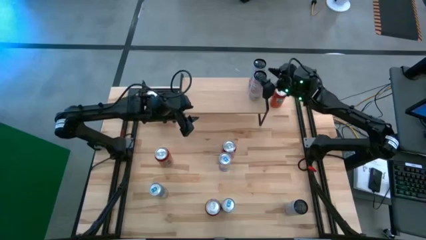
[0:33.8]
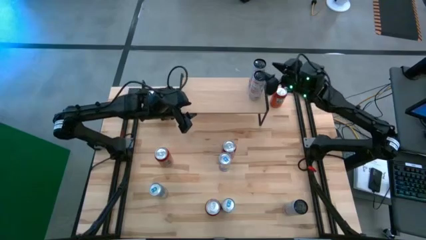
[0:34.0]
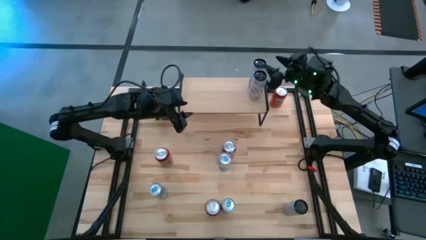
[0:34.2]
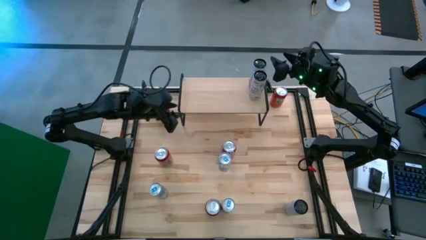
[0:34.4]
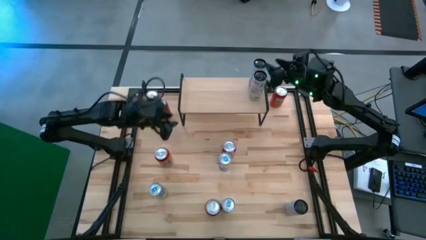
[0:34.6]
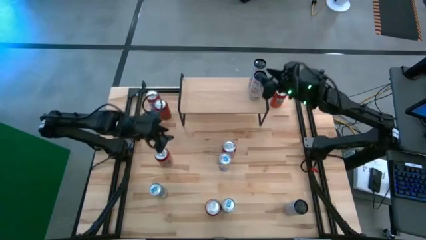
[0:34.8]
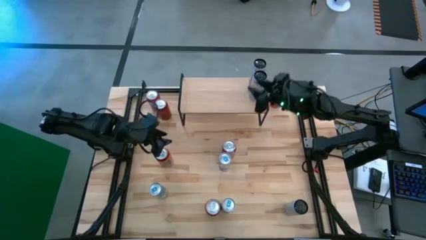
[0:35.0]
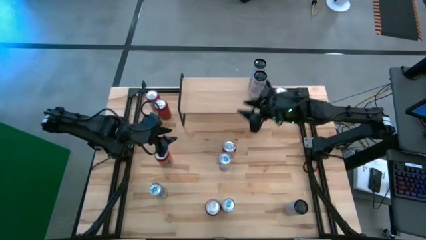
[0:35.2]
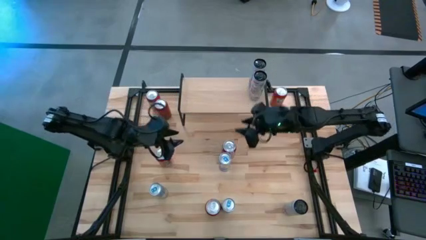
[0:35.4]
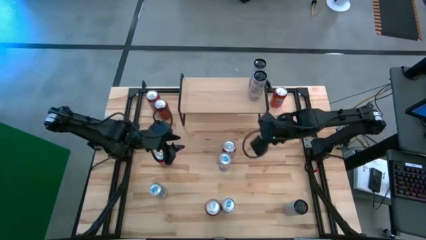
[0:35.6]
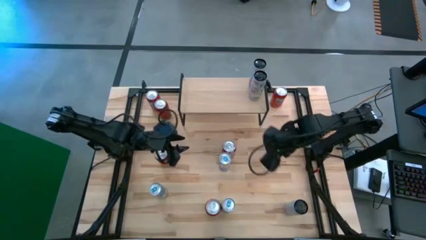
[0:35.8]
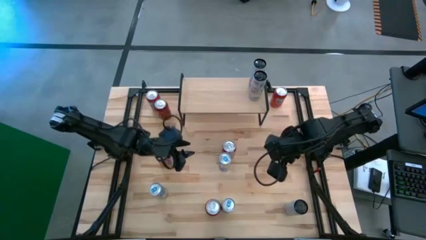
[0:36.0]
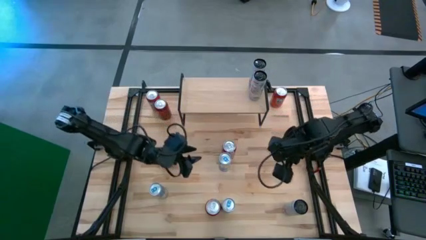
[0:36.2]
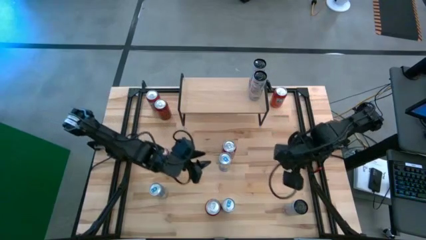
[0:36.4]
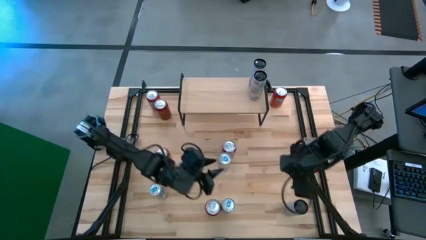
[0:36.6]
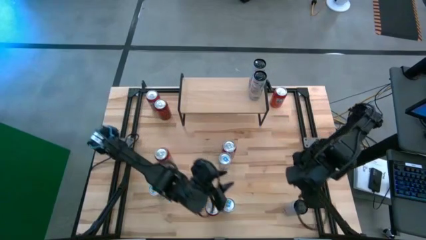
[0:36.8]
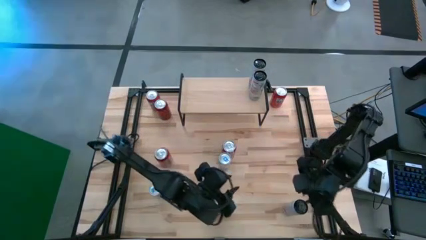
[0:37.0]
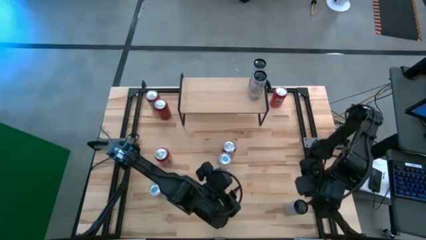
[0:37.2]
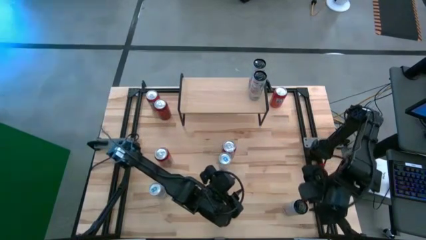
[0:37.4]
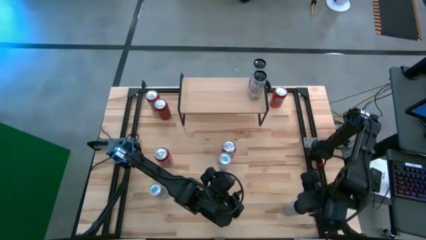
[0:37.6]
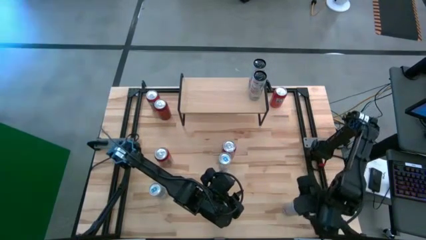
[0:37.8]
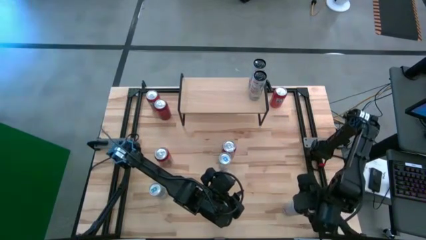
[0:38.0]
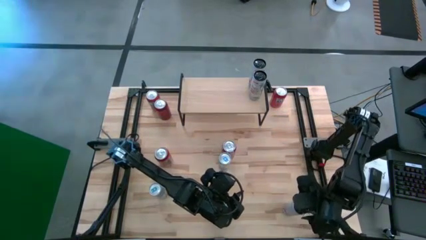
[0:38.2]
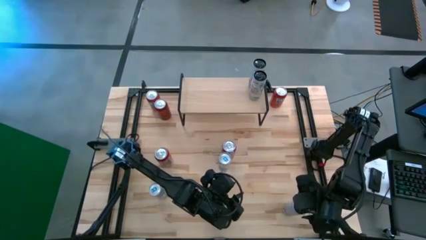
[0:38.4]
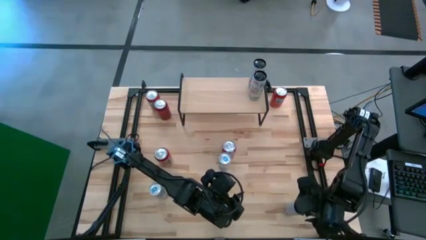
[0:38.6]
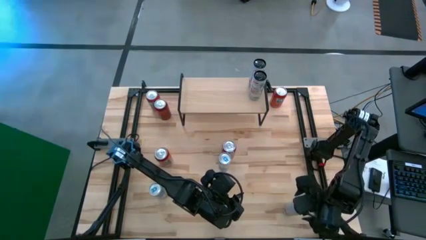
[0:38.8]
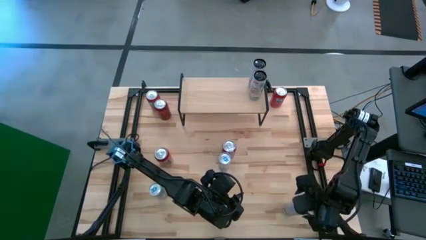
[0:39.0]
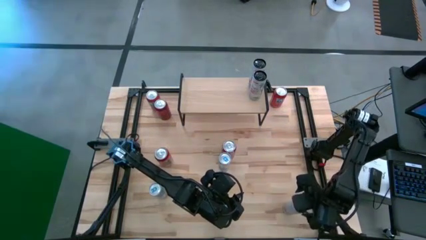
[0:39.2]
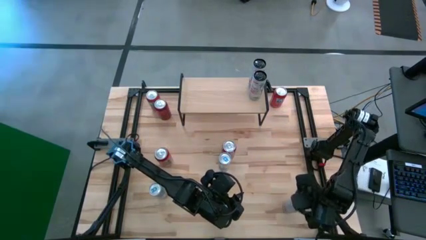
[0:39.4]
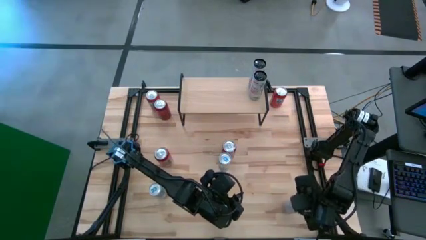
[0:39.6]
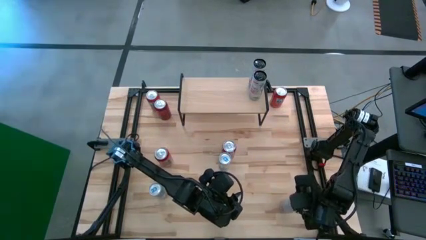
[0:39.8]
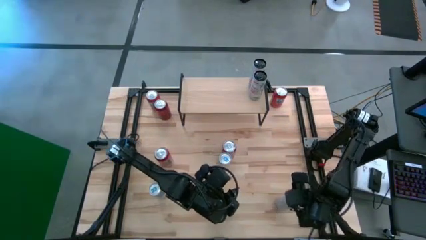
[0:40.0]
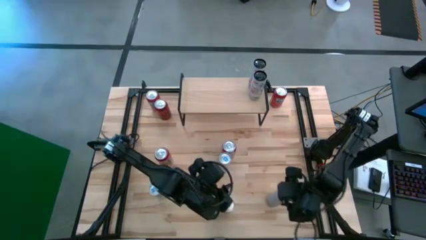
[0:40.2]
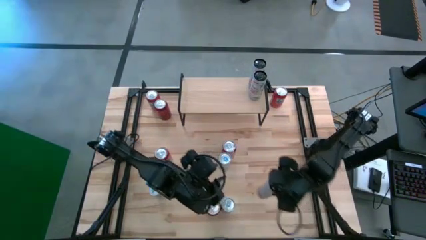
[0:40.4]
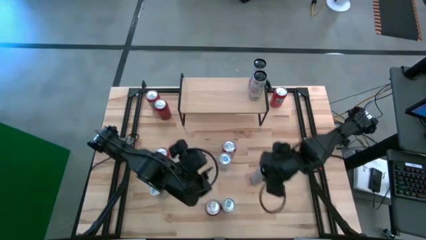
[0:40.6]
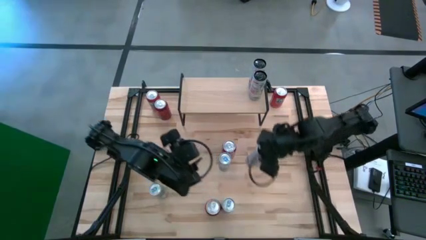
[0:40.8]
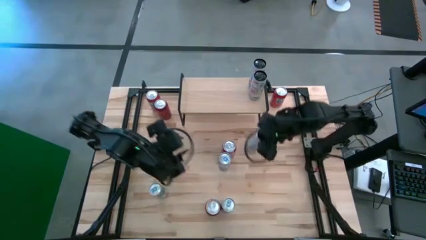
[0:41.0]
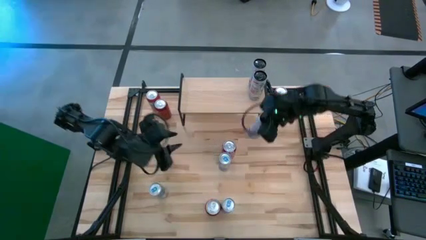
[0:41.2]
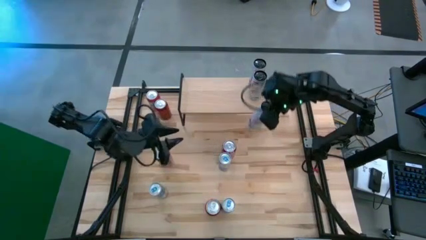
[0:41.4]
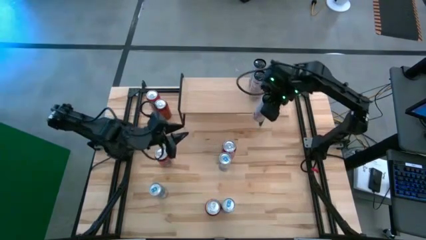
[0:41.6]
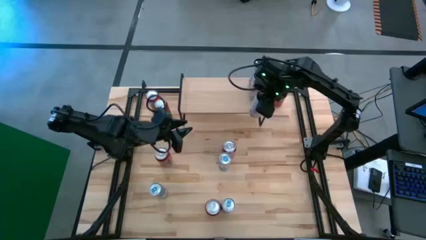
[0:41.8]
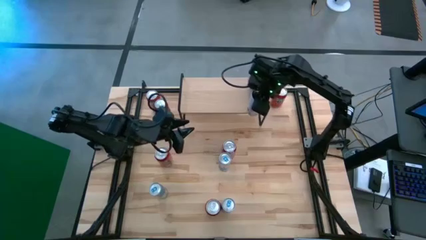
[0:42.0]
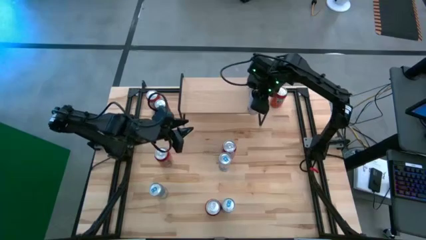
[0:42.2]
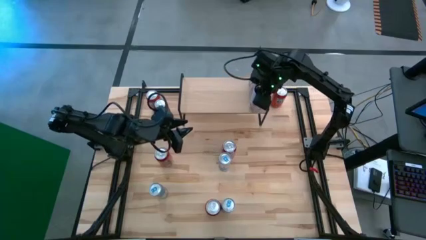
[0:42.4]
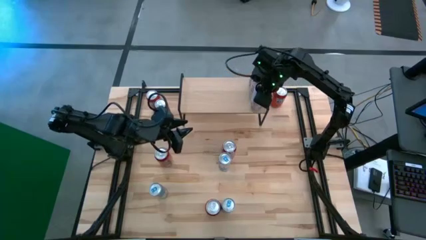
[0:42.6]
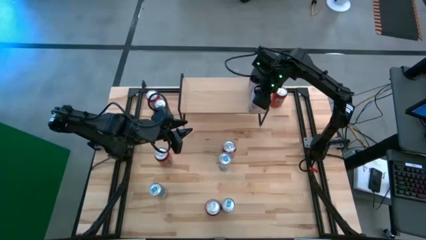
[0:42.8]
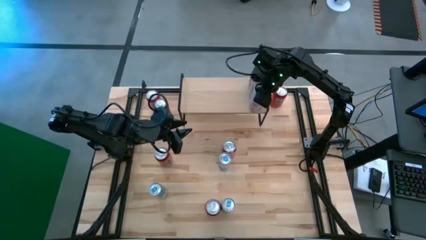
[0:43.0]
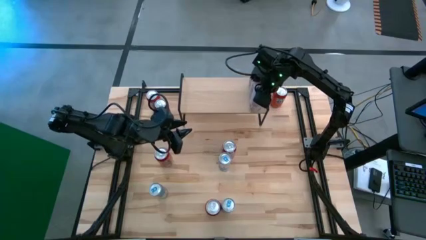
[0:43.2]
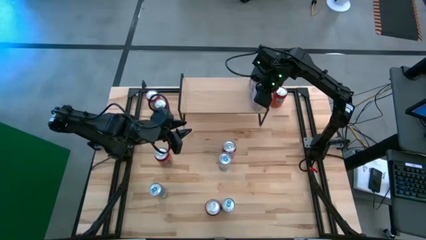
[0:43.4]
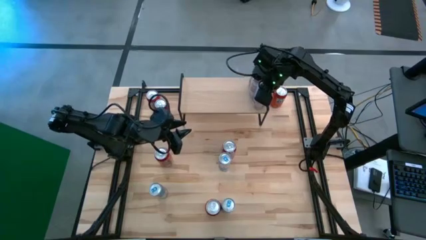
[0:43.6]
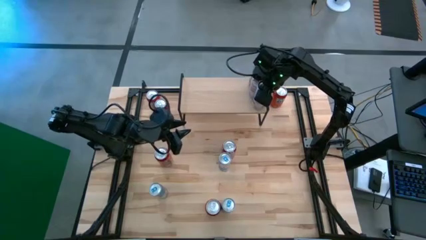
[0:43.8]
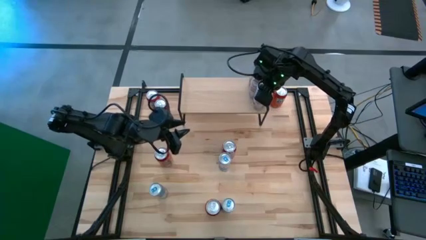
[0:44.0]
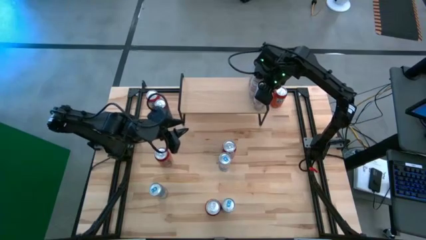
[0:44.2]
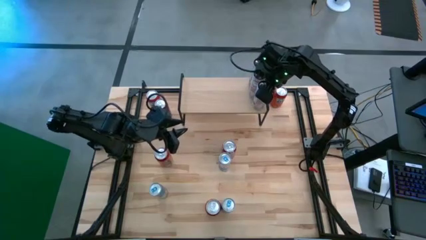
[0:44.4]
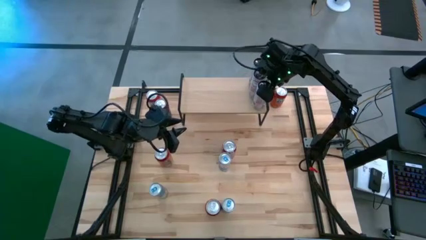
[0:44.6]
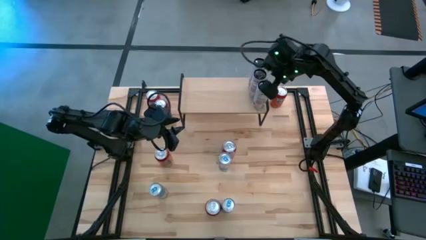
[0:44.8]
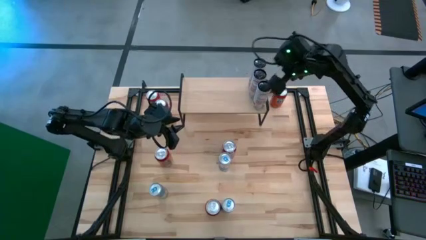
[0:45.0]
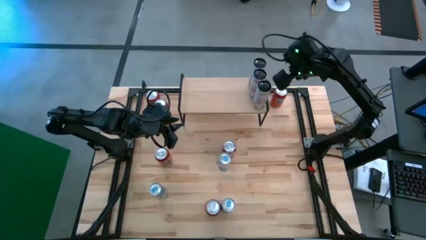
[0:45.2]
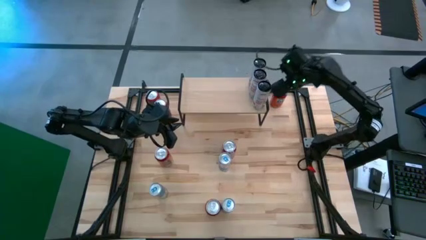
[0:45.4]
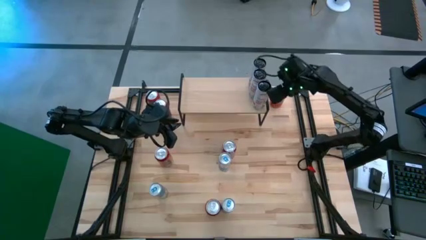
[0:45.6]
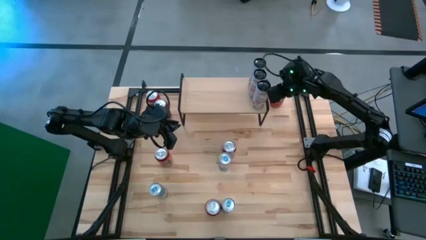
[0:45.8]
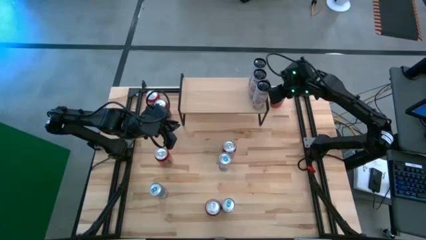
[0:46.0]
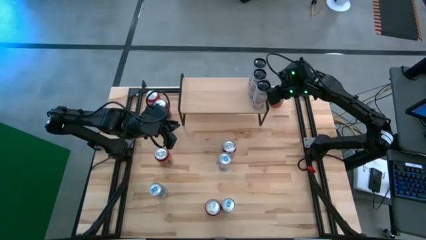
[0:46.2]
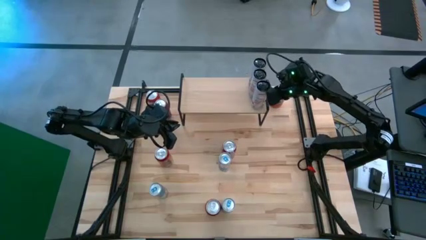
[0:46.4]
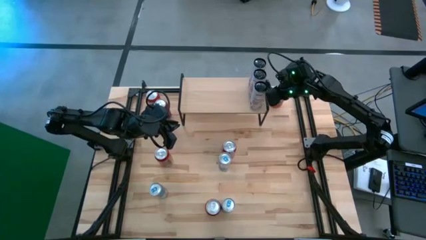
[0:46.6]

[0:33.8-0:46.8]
Task: Place canned beverage on shelf
Put the white pink soda can aligned with the other white pink soda cans on the shelf
